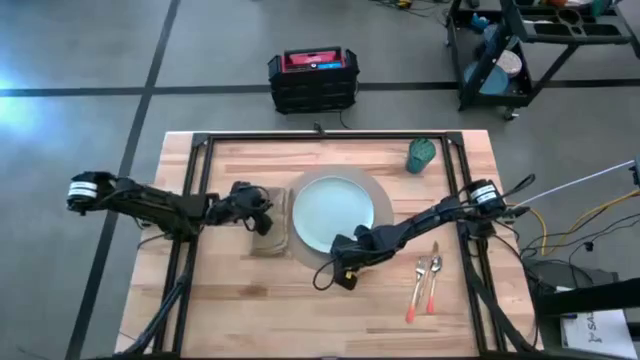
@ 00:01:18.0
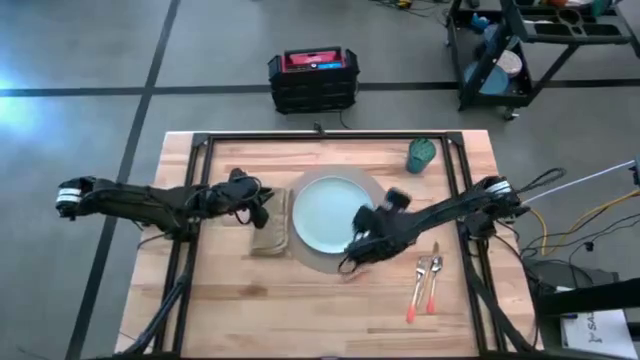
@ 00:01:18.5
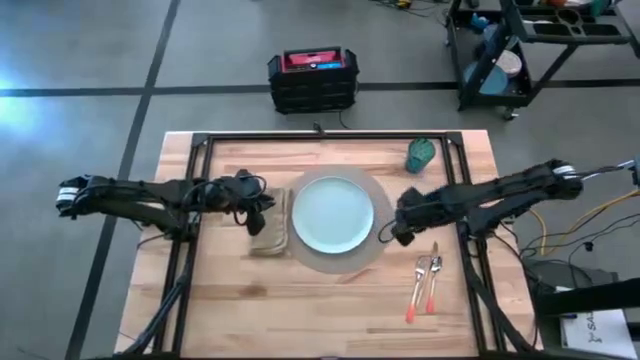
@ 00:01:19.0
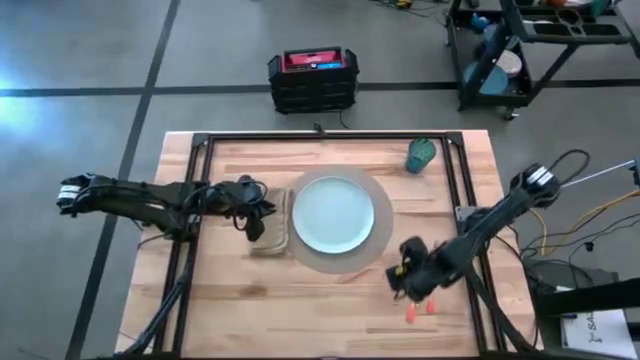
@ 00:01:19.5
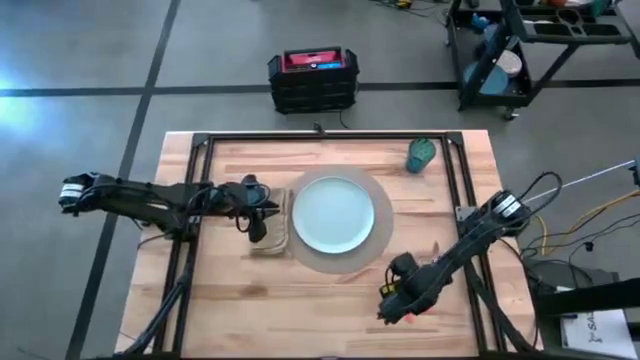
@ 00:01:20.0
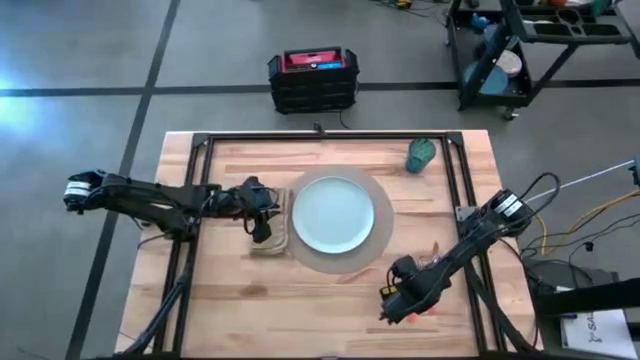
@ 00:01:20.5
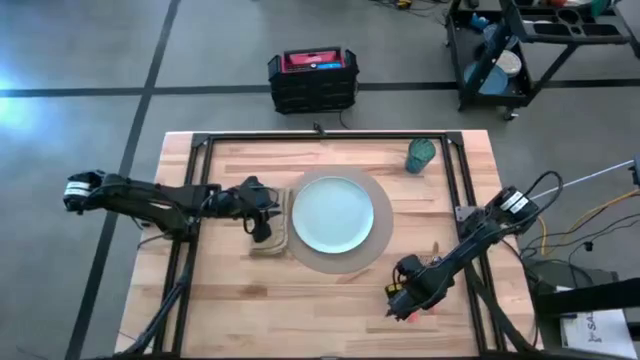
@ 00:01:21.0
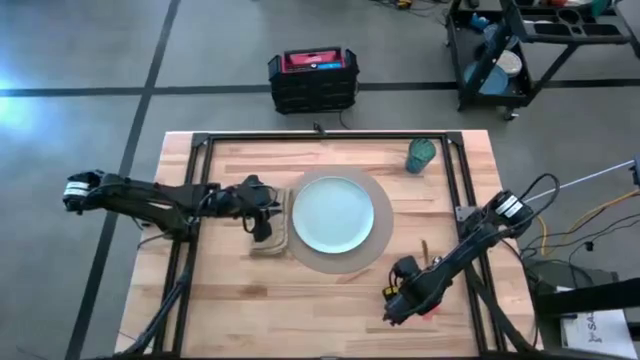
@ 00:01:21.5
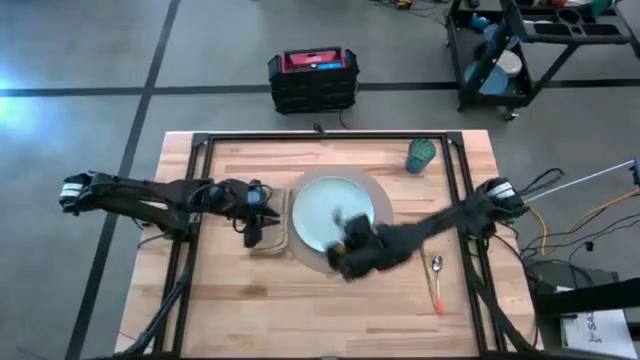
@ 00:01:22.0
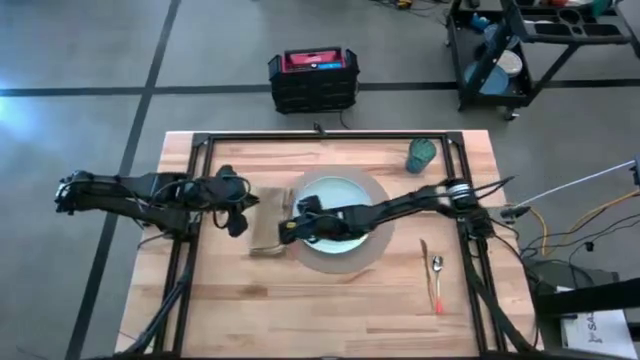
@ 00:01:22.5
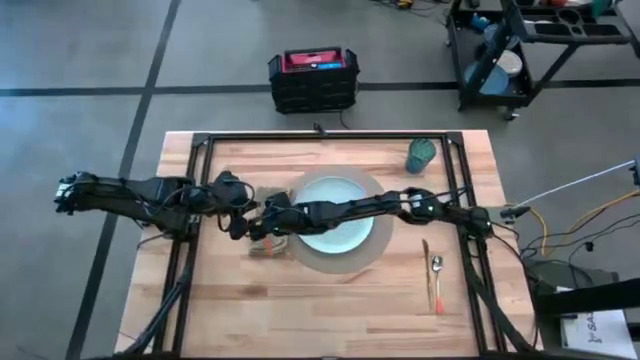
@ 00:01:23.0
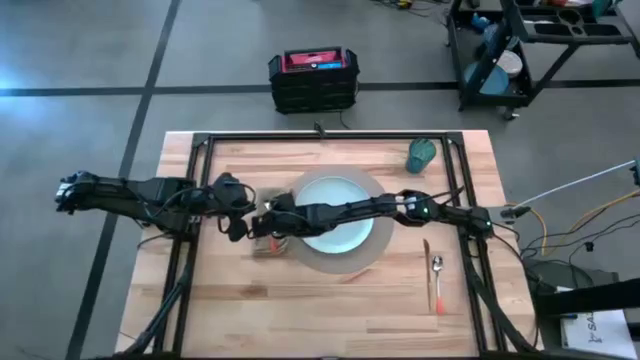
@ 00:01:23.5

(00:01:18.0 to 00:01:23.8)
Task: Set table place
Put the orange fork on the top of the brown table napkin

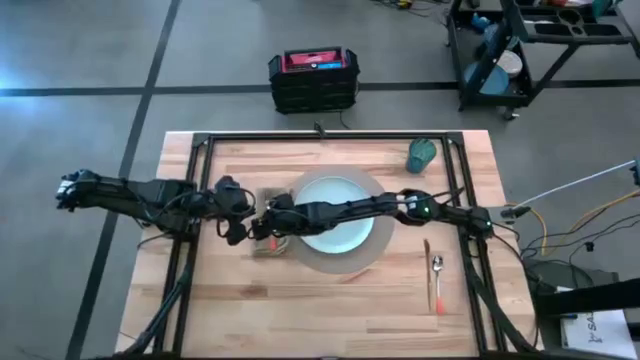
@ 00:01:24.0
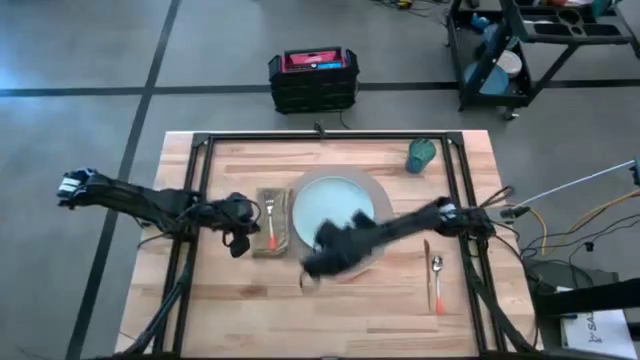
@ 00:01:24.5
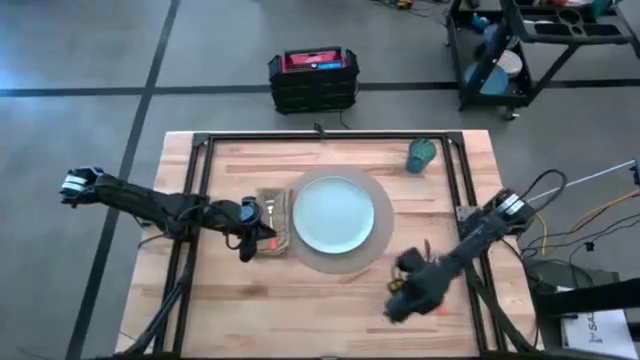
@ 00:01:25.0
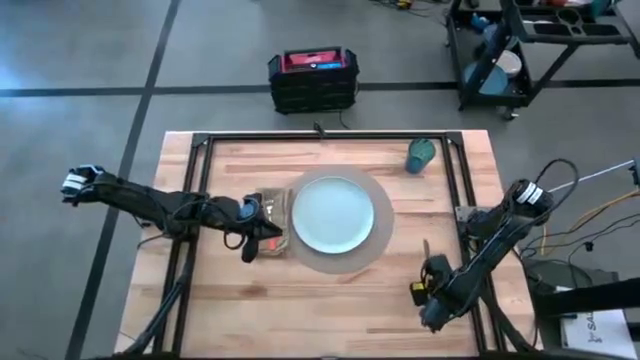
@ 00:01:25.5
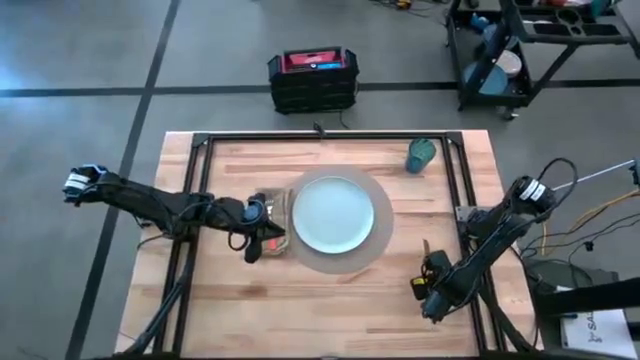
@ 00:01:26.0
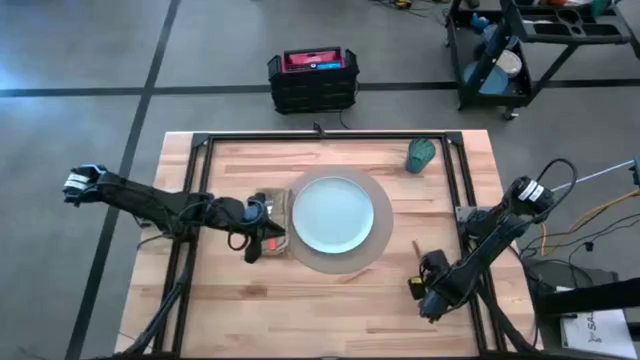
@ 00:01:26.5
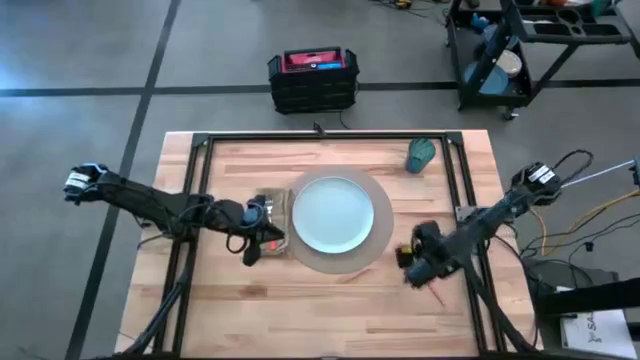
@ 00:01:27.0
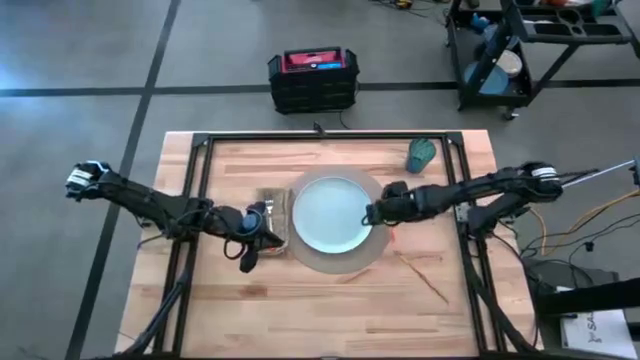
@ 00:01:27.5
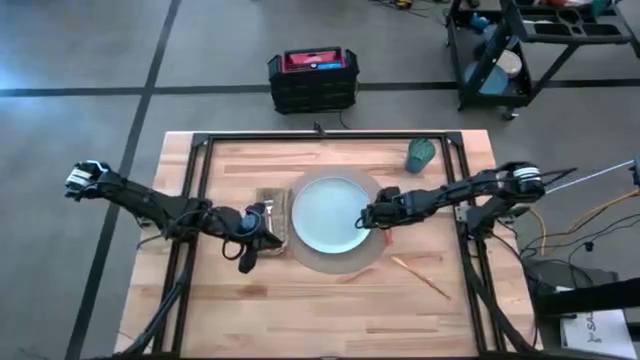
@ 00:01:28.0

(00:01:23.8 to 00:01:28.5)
Put the orange spoon on the grey tablemat to the right of the white plate

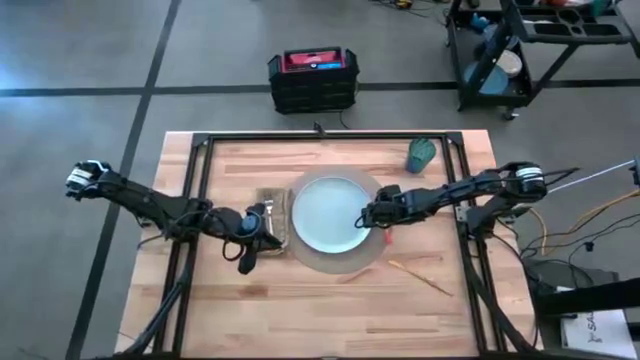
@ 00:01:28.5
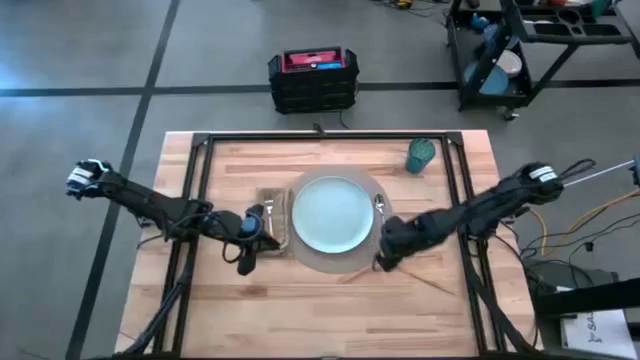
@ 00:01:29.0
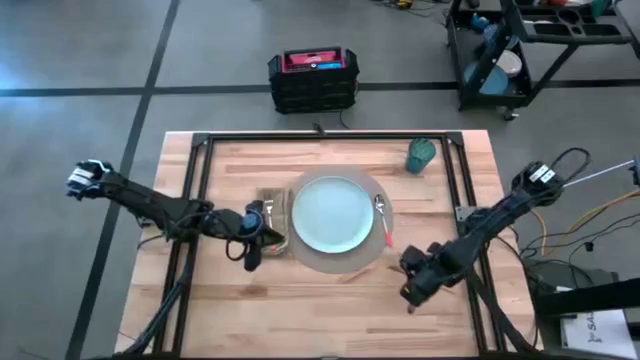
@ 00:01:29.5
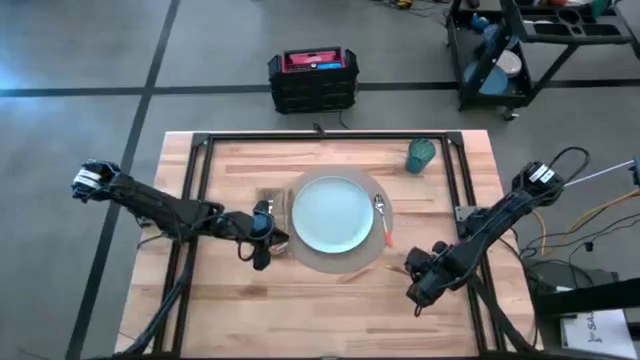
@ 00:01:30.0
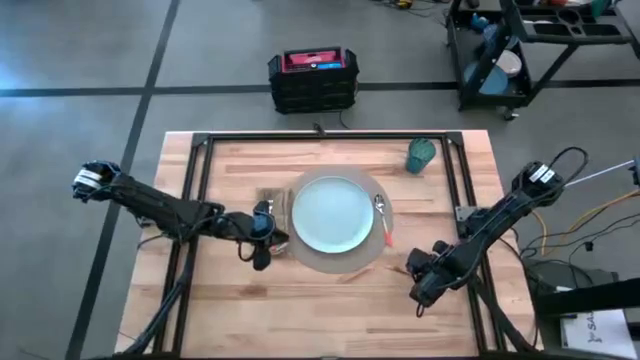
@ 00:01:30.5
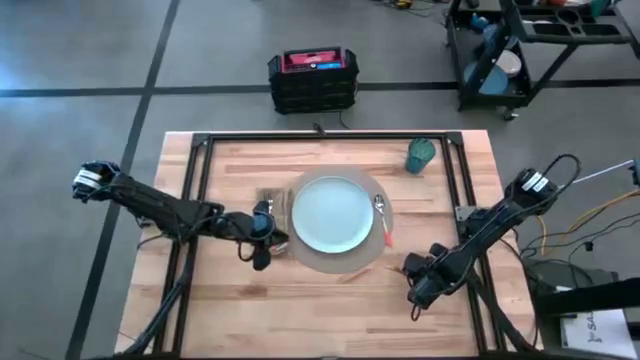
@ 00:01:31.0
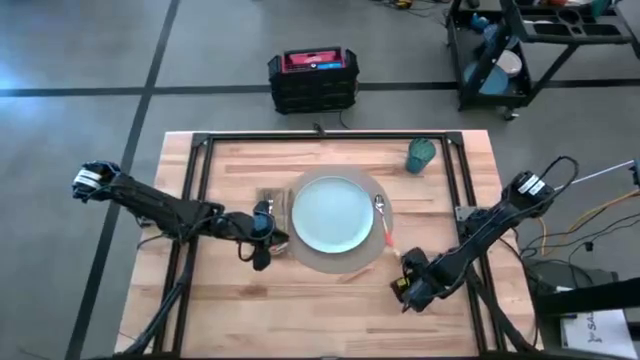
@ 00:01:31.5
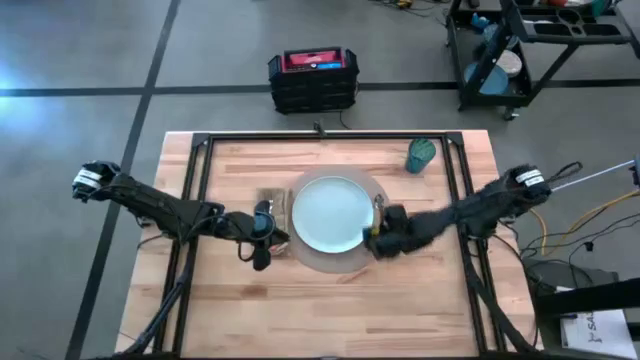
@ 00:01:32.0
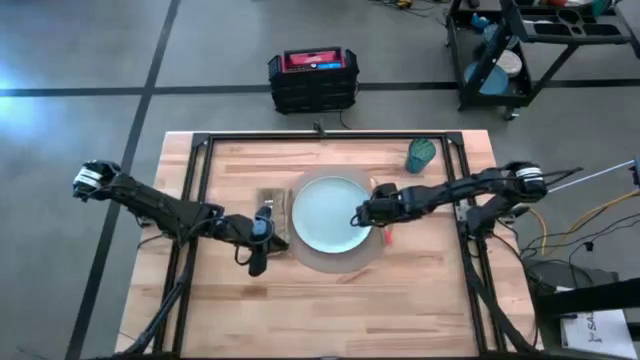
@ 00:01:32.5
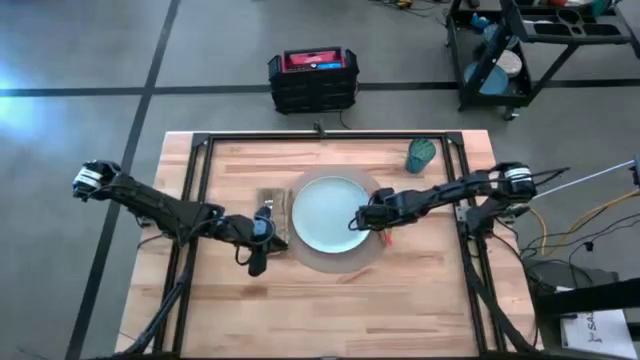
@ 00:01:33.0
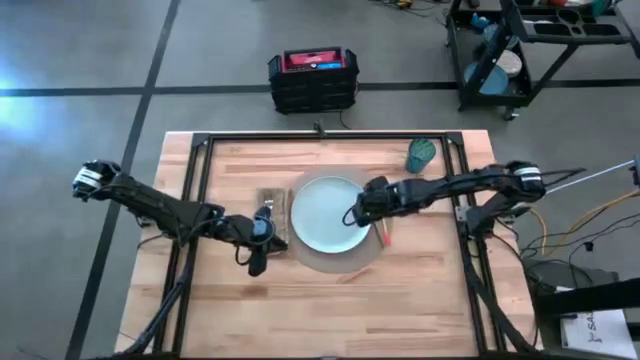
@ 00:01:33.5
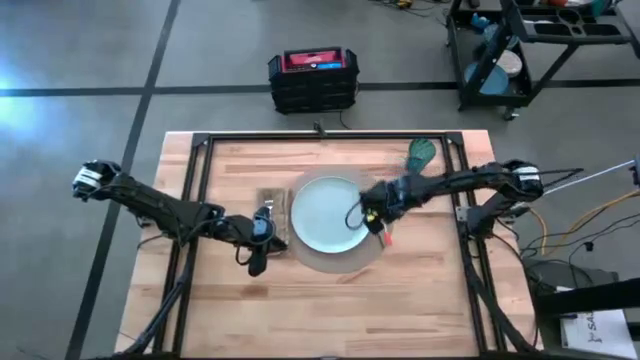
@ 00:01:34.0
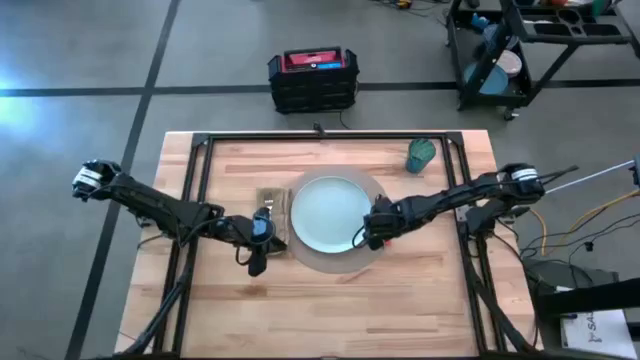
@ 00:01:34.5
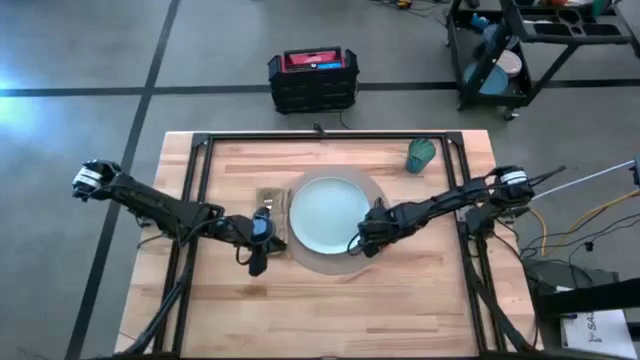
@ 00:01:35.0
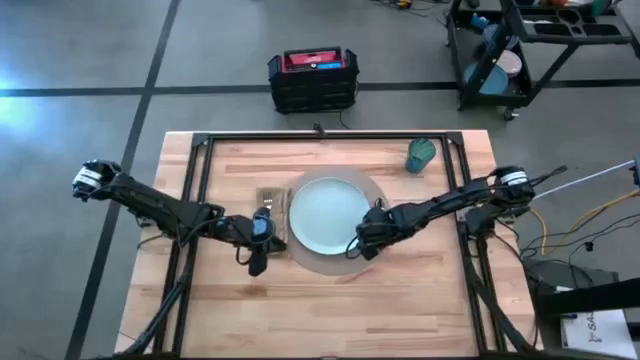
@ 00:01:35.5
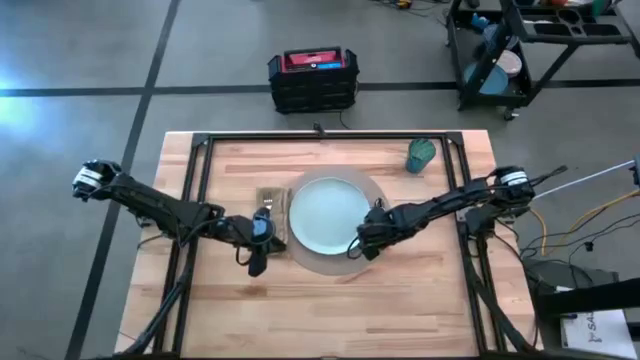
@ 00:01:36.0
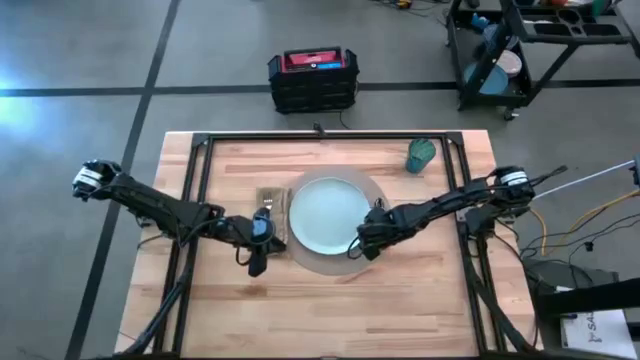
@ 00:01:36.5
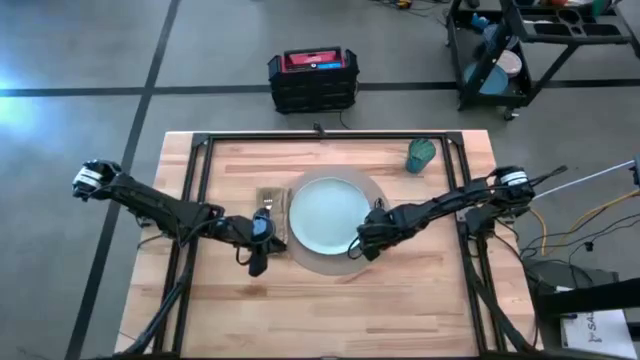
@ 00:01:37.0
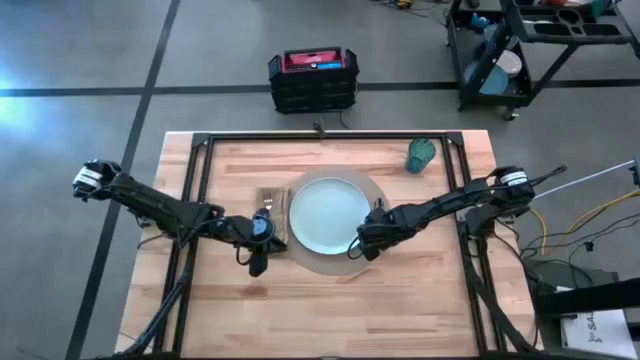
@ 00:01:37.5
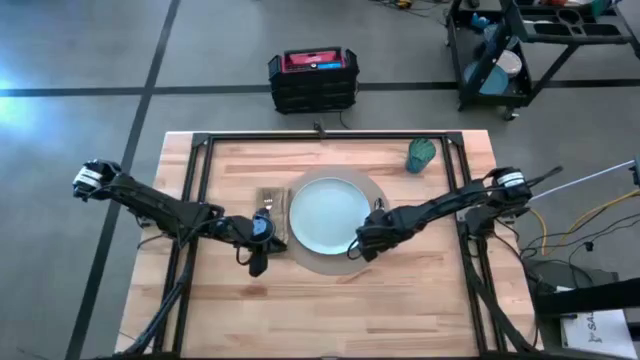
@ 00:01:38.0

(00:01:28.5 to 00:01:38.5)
Put the orange table knife on the grey tablemat to the right of the white plate

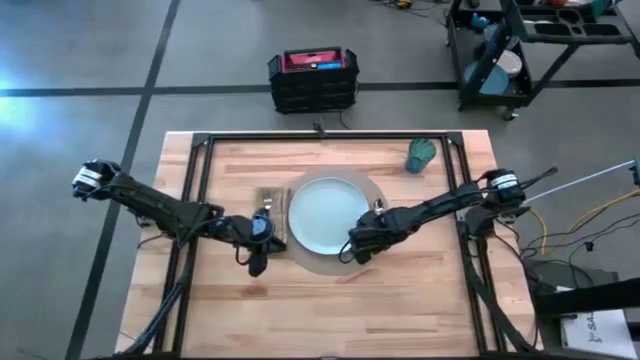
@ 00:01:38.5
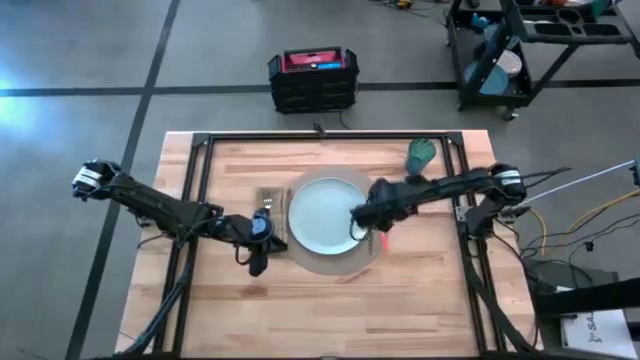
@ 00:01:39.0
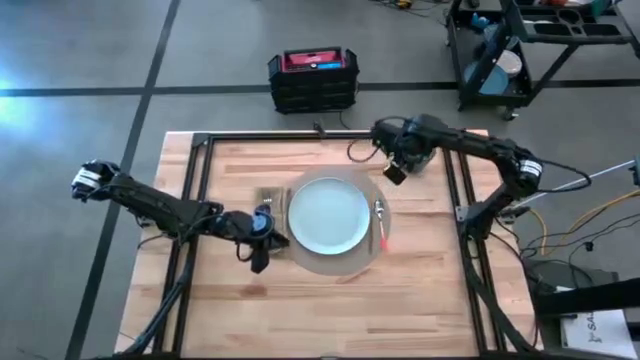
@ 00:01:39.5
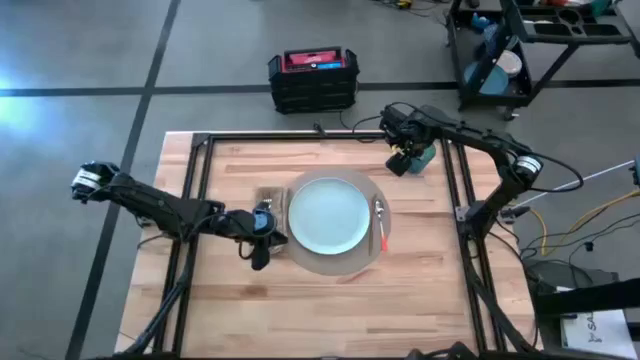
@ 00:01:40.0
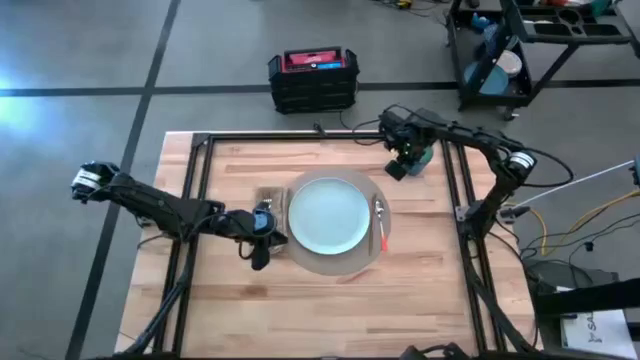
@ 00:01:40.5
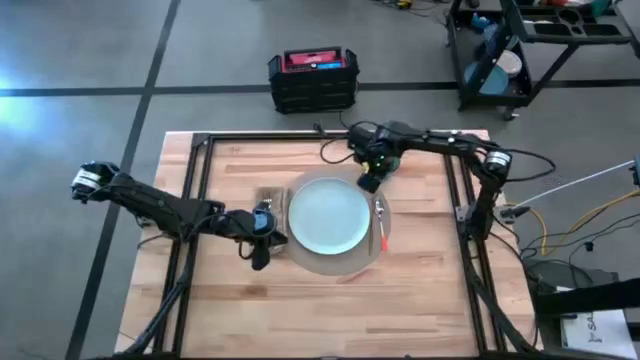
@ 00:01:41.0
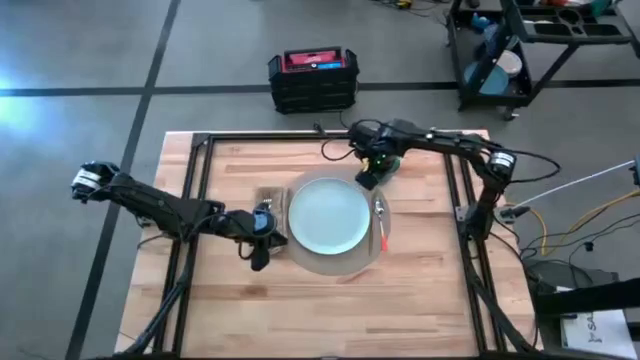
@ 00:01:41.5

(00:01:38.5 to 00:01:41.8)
Put the blue cup on the top right of the tablemat
